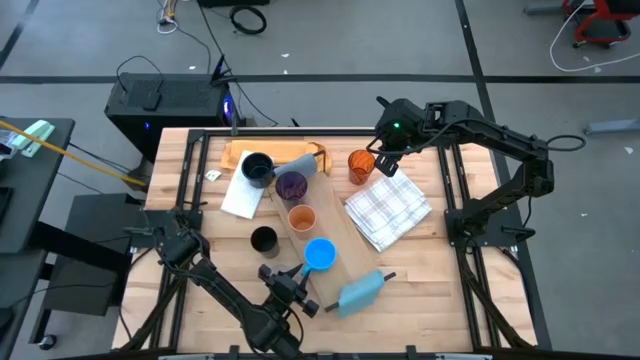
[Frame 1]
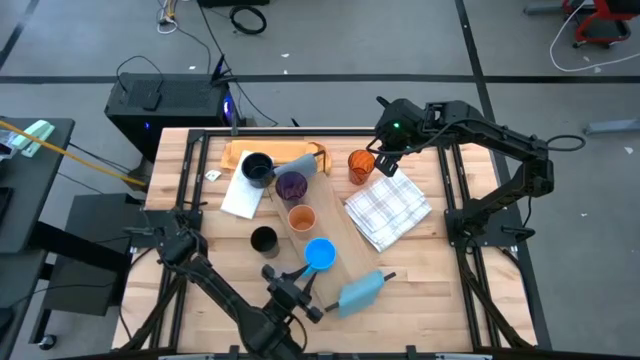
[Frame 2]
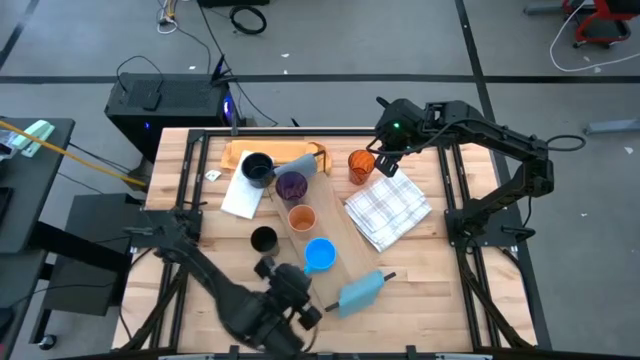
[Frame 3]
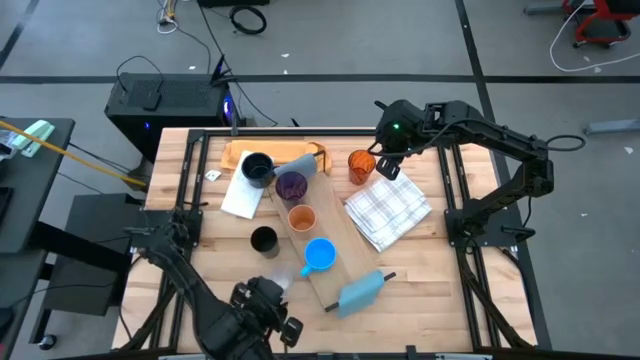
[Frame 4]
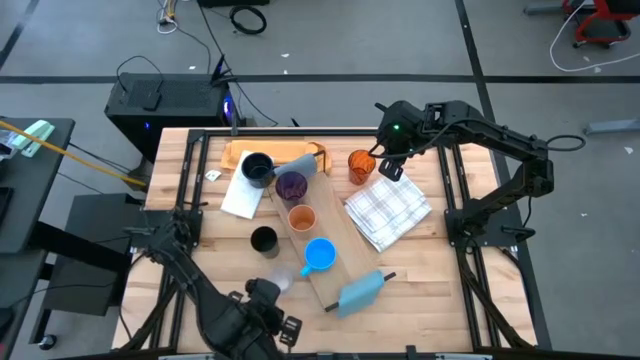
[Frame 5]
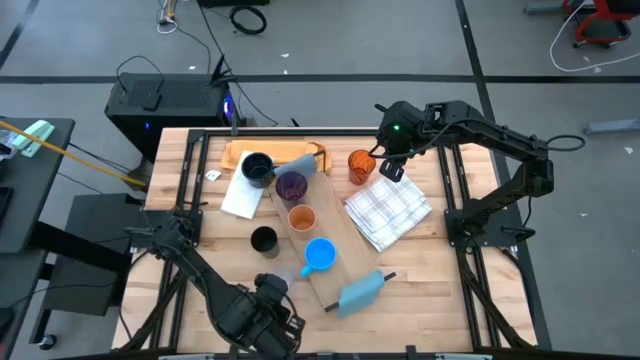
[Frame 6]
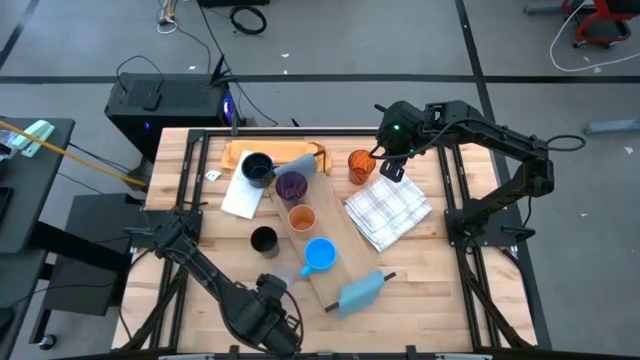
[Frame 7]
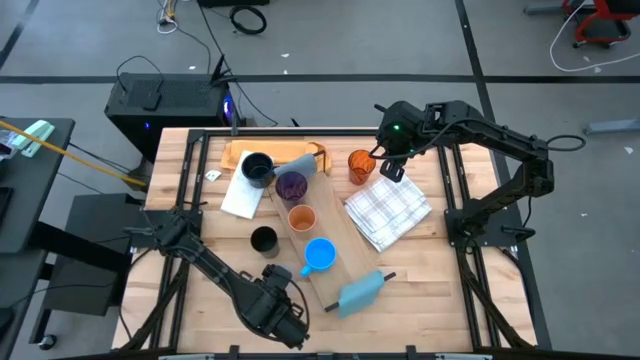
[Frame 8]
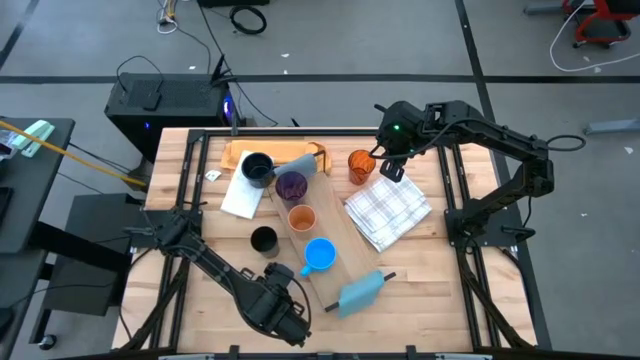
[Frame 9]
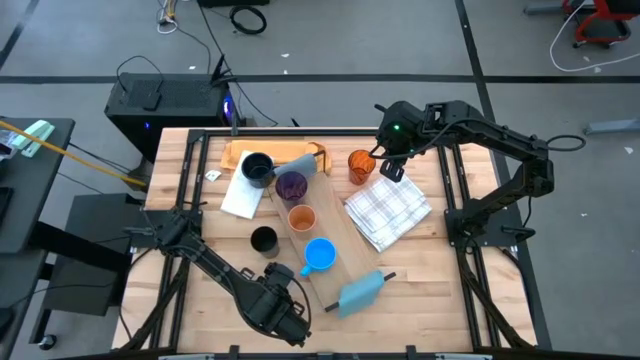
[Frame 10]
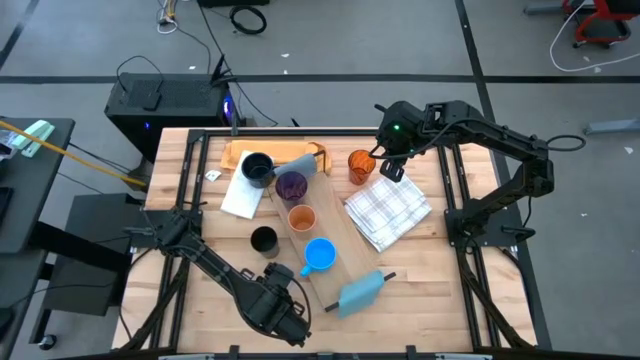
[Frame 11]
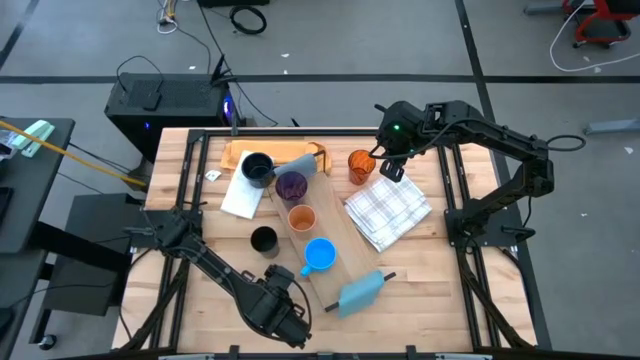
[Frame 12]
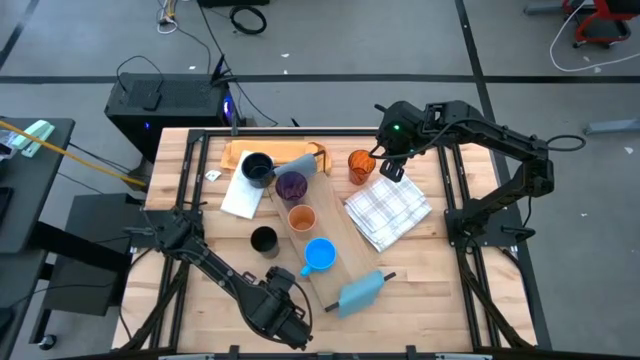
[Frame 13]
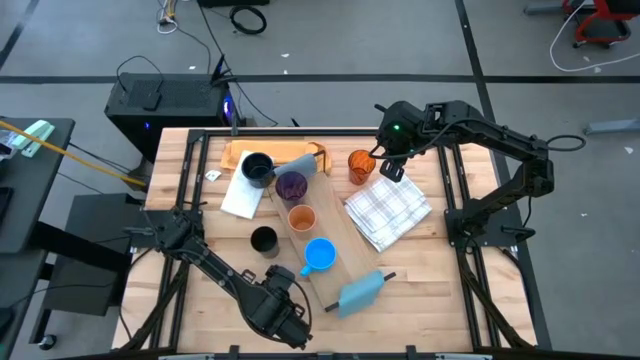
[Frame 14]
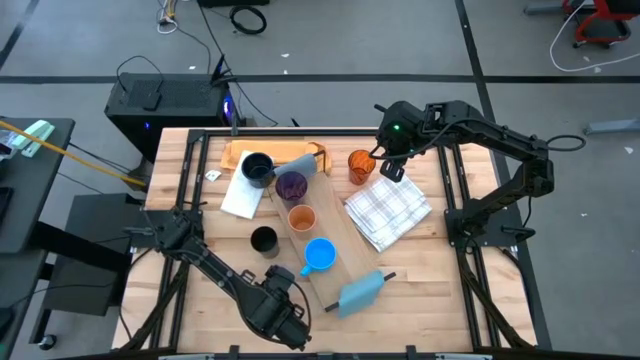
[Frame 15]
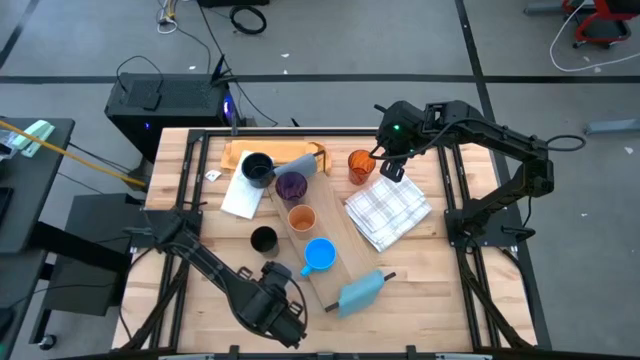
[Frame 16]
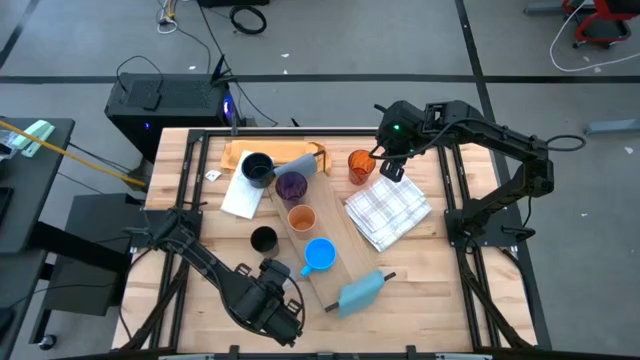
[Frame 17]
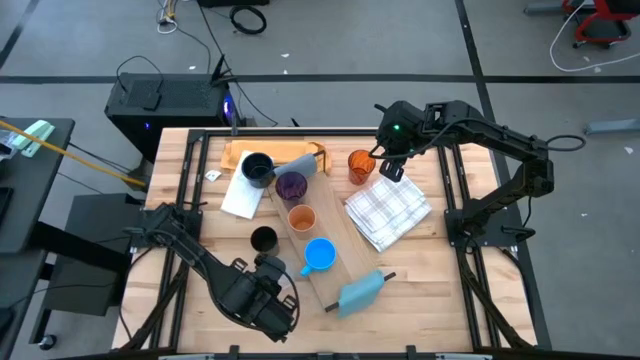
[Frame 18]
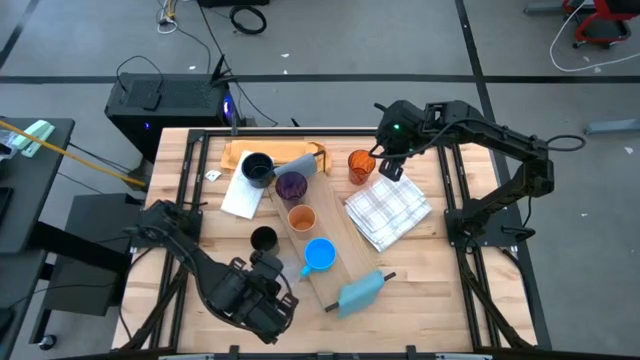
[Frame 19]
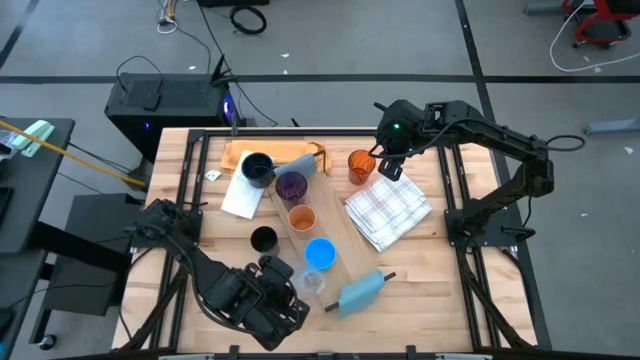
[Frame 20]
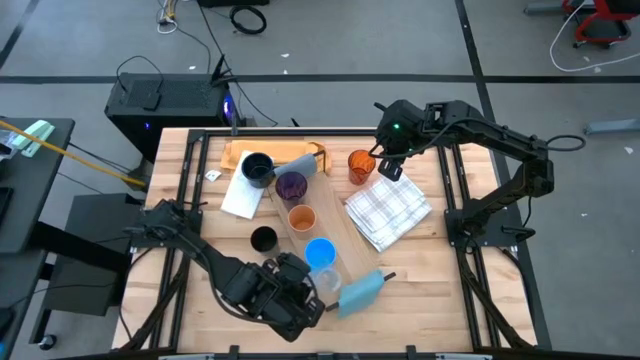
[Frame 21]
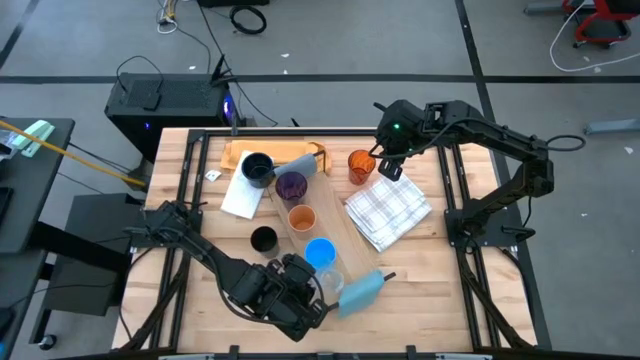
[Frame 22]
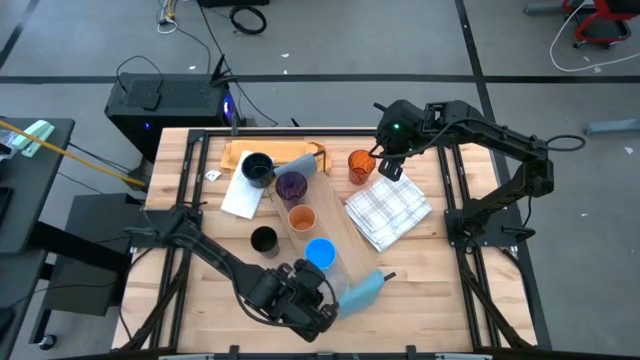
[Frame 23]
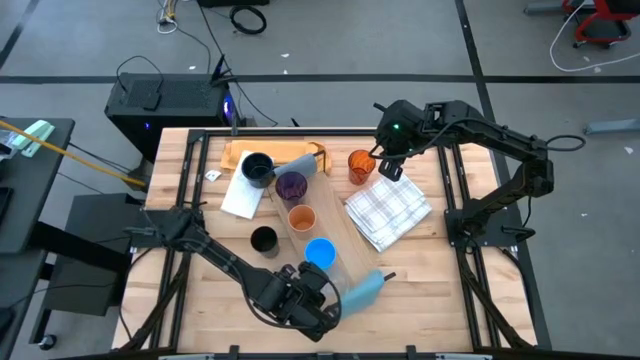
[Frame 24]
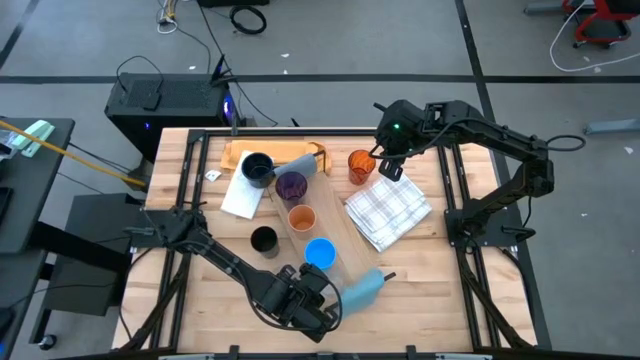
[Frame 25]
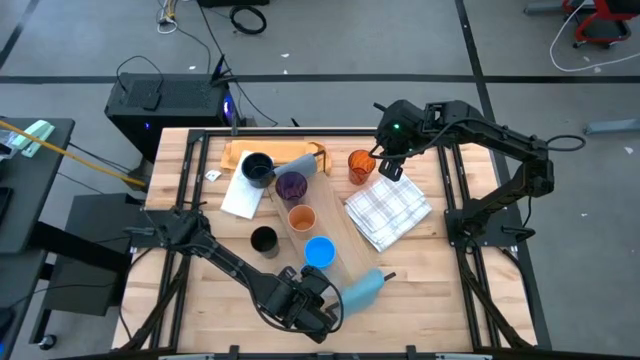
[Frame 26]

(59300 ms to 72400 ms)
Task: Stack small to large cups/mugs on shelf
Put the top transparent mug on the shelf

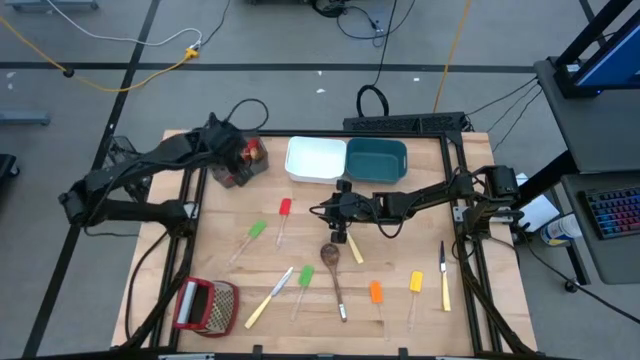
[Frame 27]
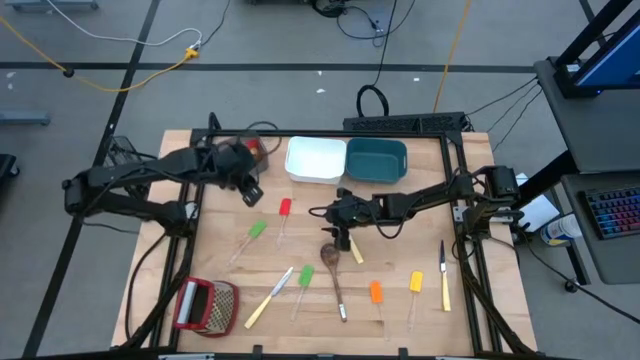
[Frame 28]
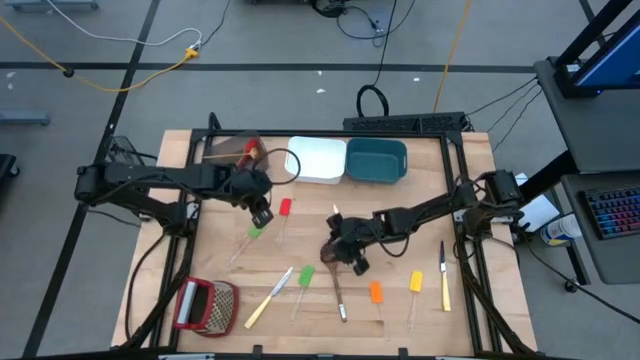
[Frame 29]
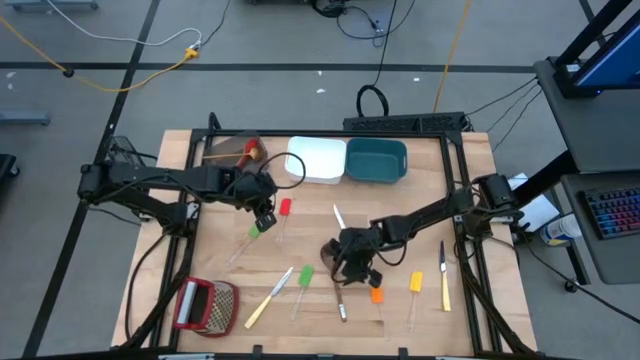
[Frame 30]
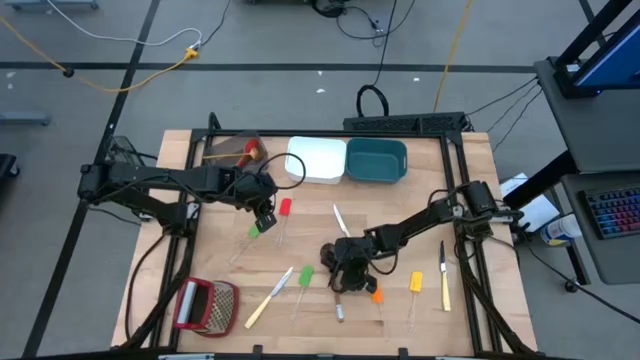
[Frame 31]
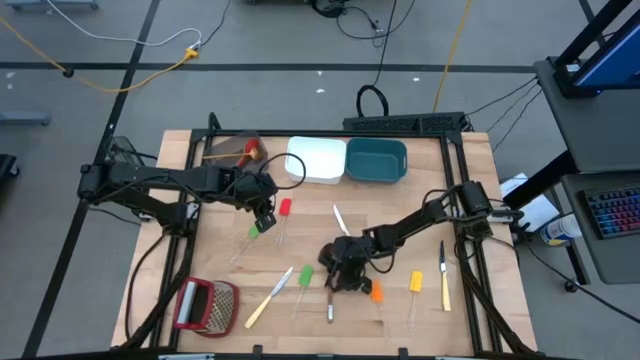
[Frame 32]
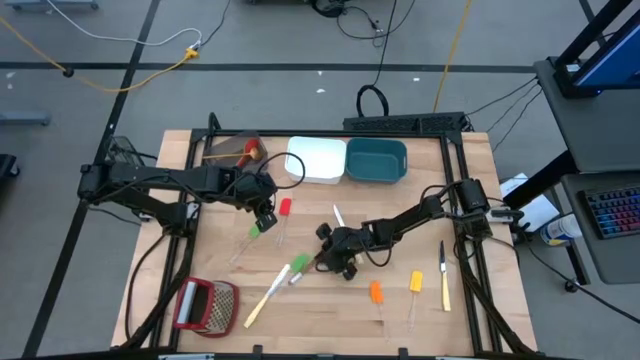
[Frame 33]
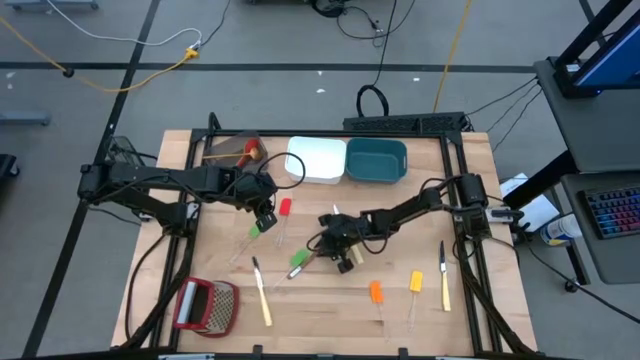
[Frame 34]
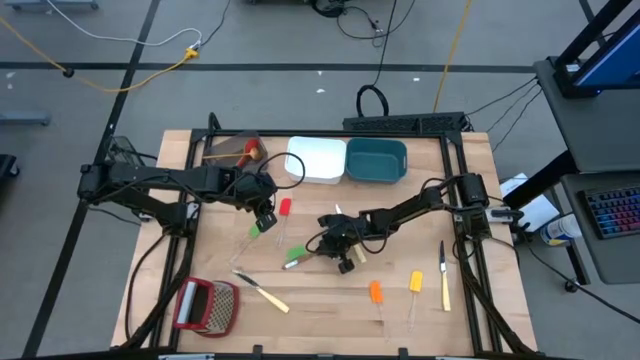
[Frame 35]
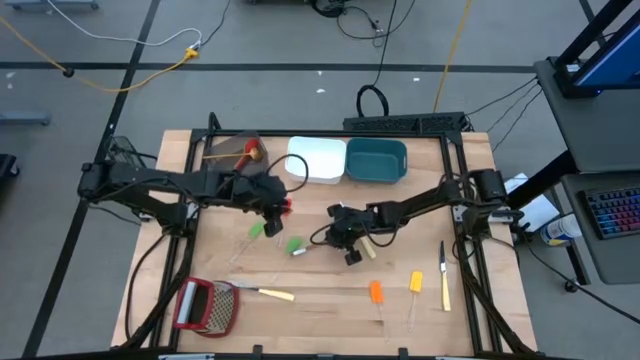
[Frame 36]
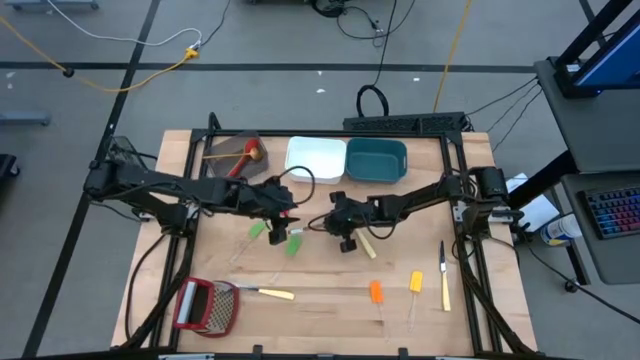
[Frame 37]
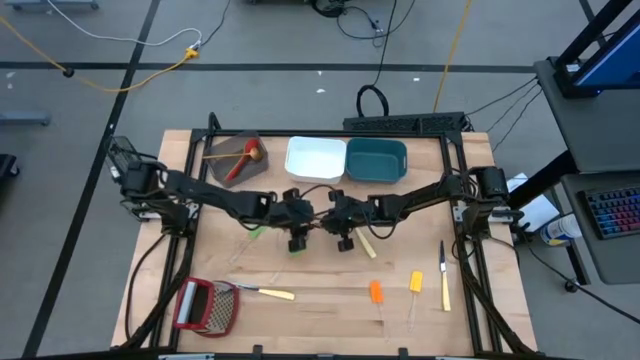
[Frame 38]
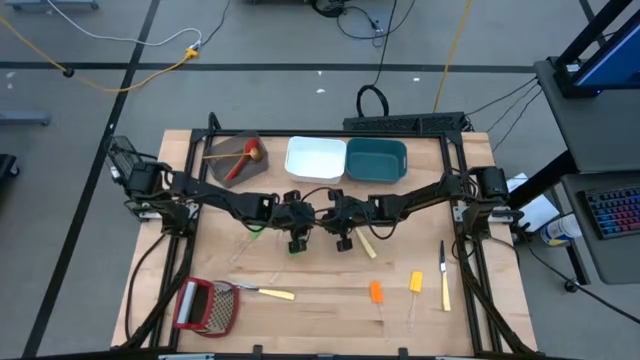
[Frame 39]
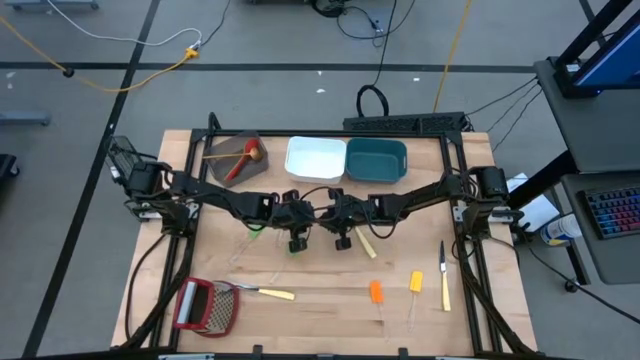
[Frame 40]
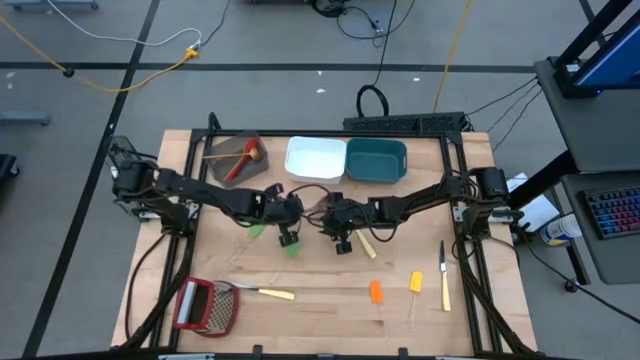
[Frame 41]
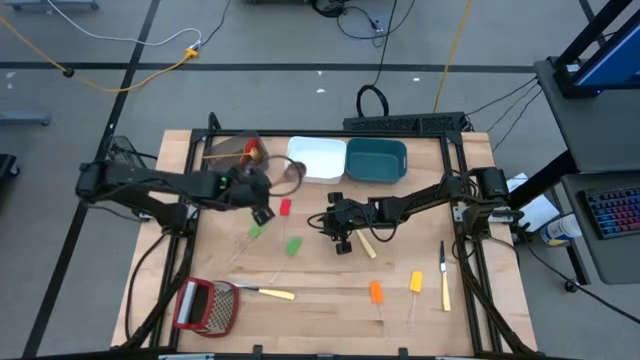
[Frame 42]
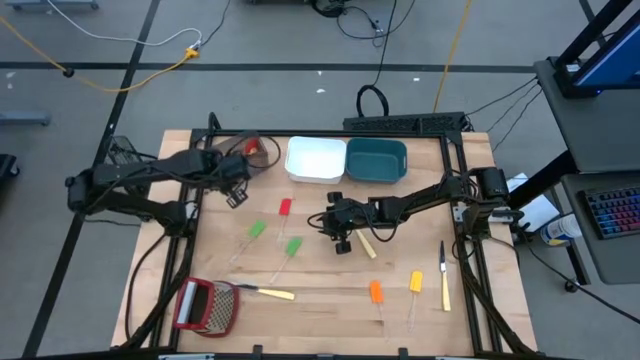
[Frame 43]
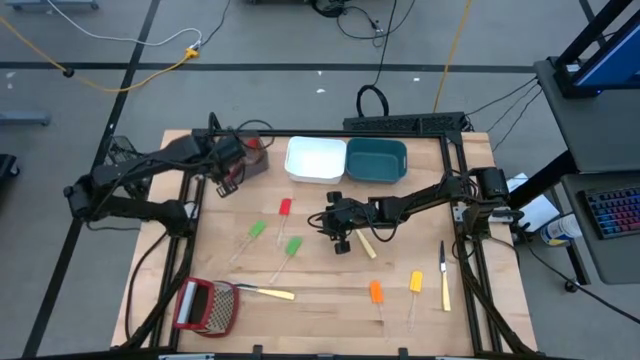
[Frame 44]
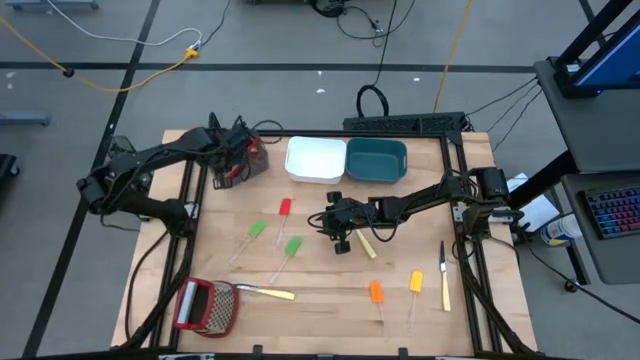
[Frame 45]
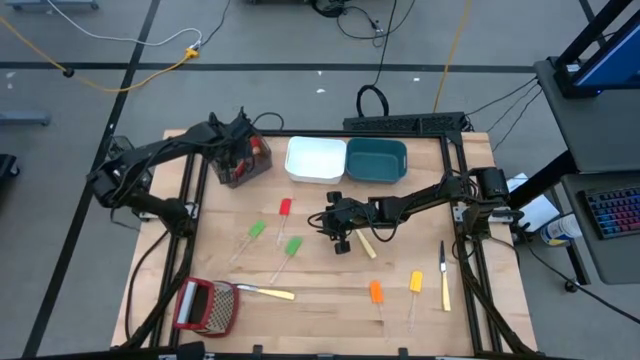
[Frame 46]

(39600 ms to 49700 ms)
Task: Pick & Place Kitchen Items
Put the wooden serving spoon into the black bin
